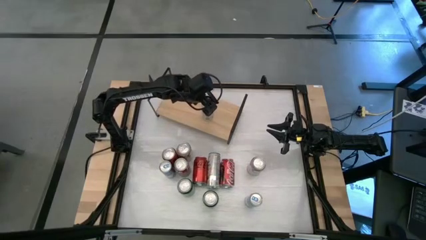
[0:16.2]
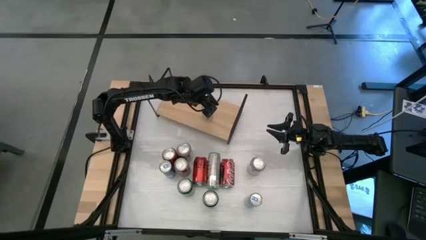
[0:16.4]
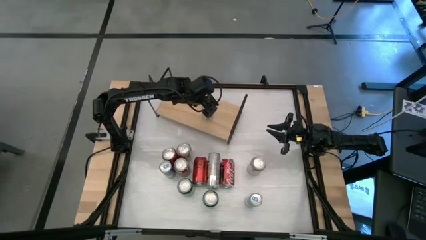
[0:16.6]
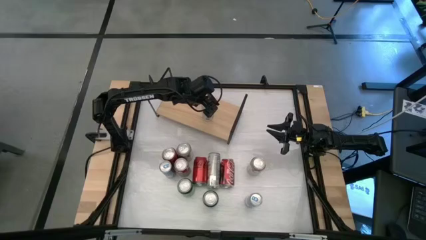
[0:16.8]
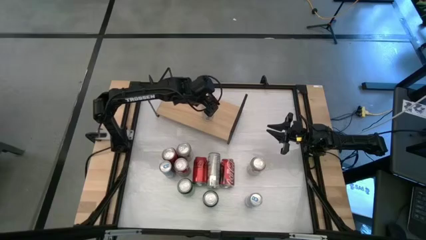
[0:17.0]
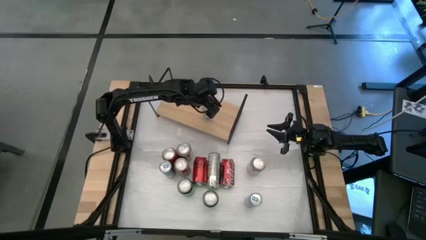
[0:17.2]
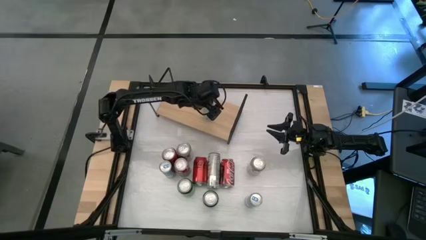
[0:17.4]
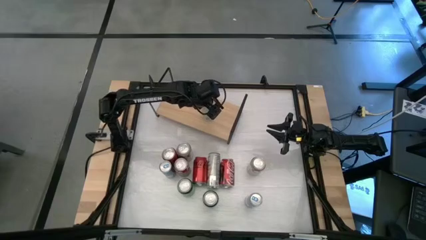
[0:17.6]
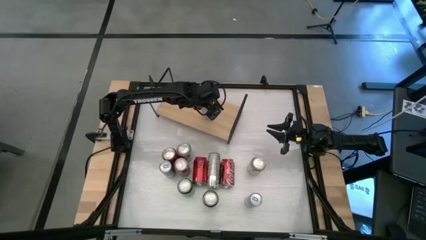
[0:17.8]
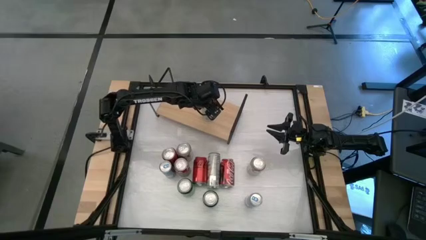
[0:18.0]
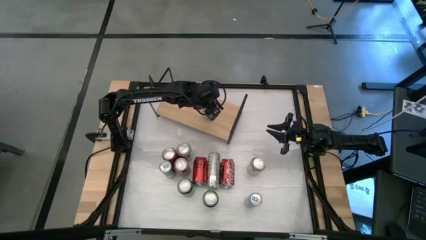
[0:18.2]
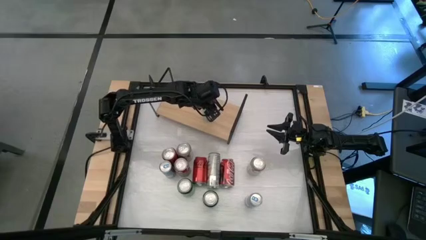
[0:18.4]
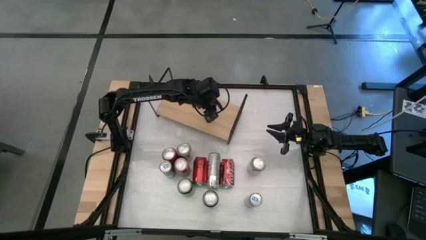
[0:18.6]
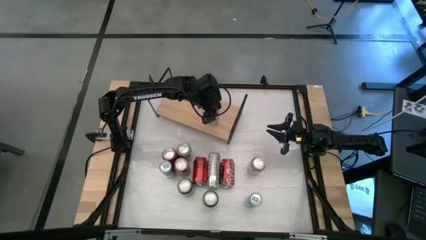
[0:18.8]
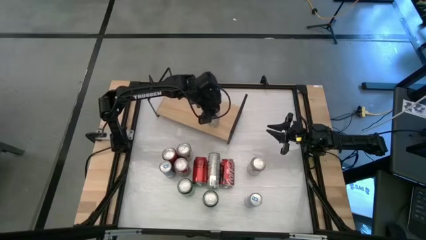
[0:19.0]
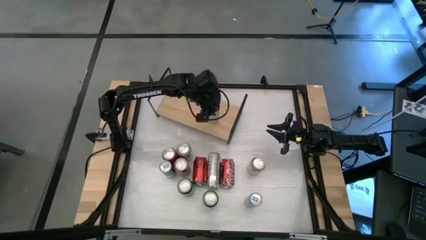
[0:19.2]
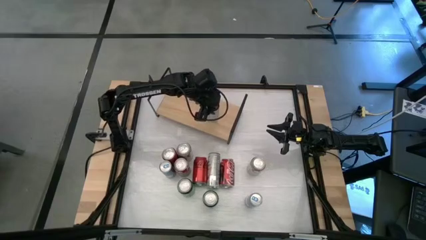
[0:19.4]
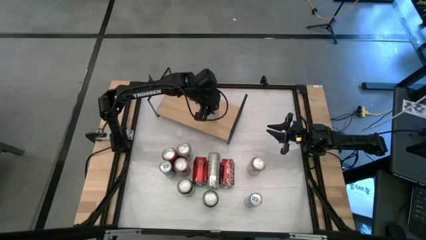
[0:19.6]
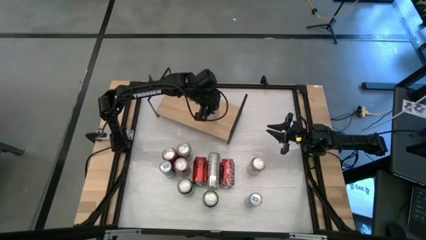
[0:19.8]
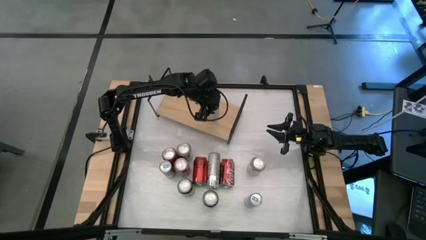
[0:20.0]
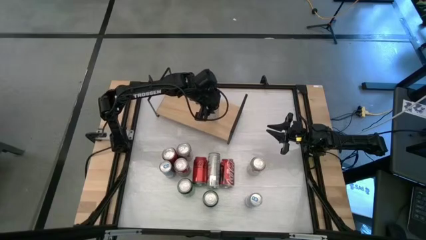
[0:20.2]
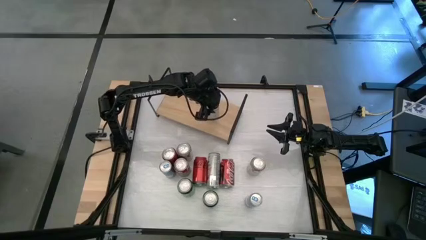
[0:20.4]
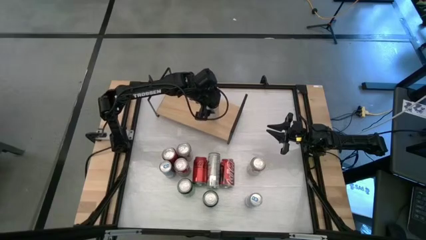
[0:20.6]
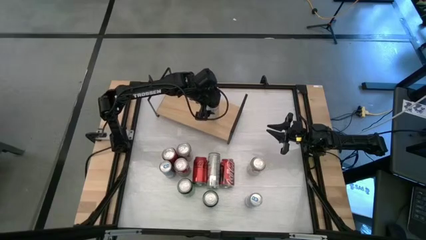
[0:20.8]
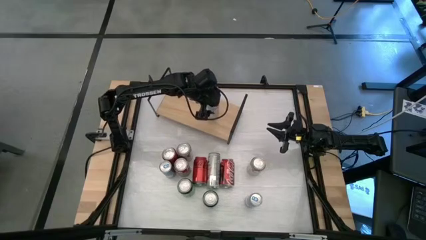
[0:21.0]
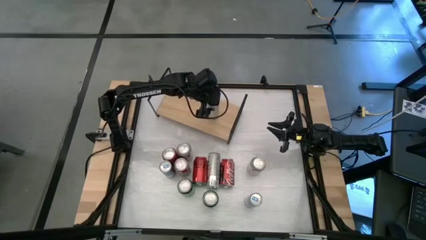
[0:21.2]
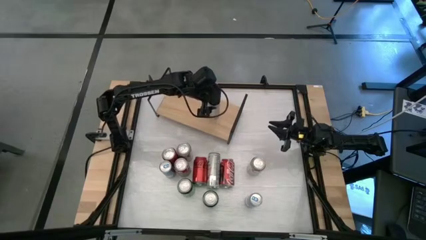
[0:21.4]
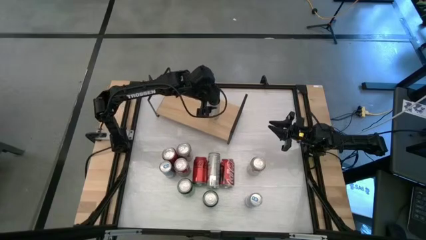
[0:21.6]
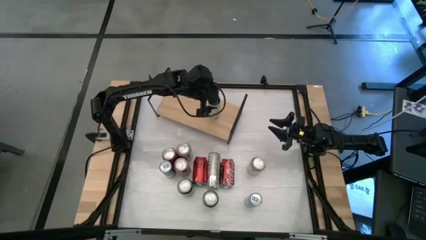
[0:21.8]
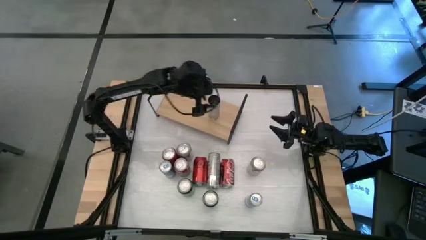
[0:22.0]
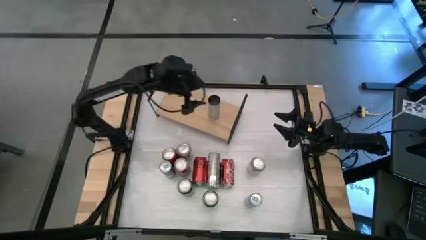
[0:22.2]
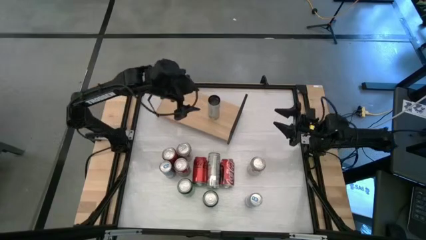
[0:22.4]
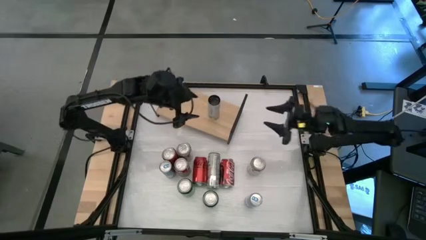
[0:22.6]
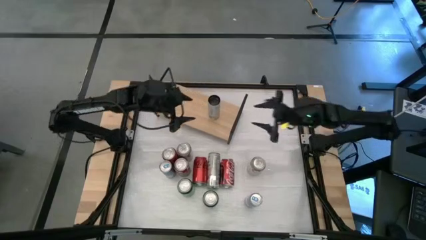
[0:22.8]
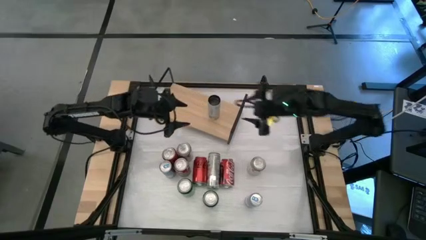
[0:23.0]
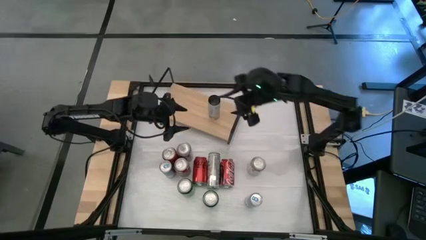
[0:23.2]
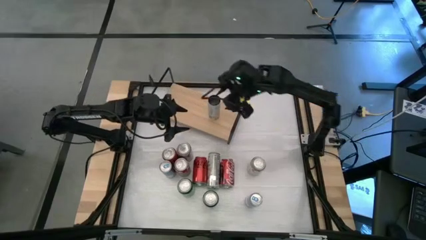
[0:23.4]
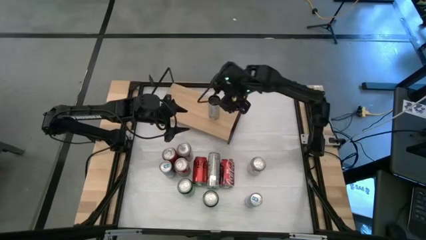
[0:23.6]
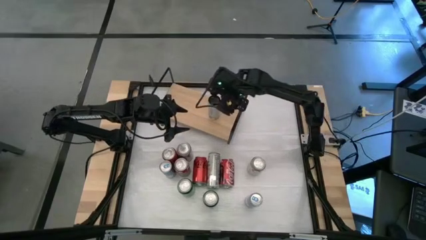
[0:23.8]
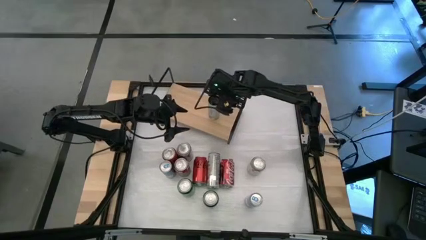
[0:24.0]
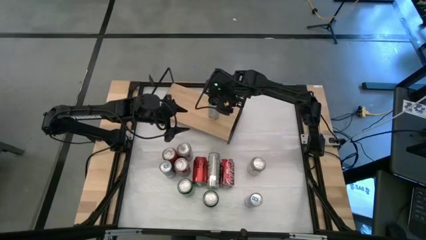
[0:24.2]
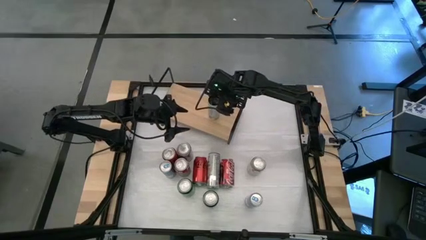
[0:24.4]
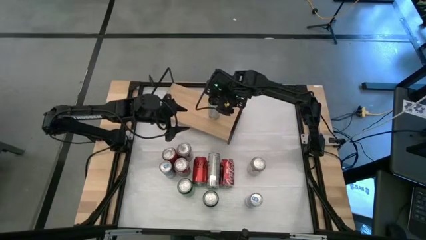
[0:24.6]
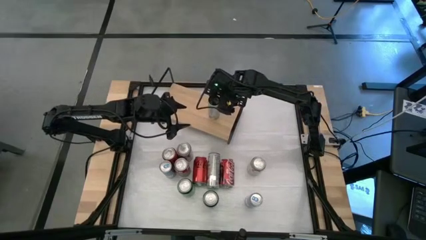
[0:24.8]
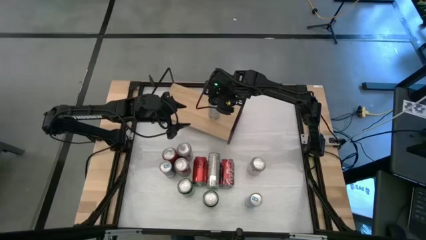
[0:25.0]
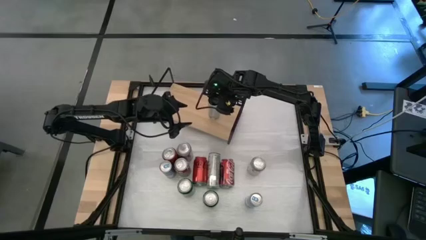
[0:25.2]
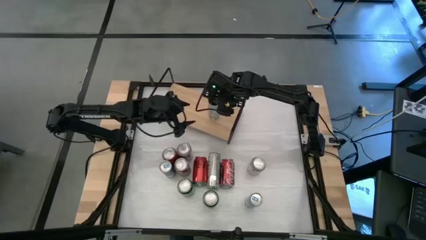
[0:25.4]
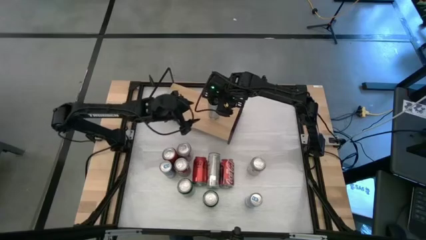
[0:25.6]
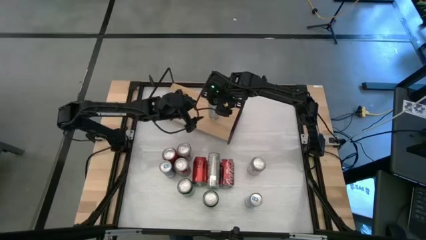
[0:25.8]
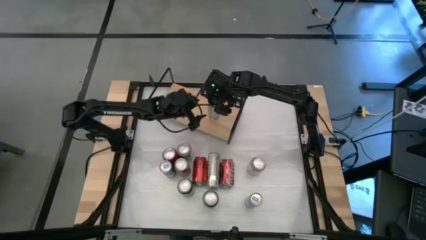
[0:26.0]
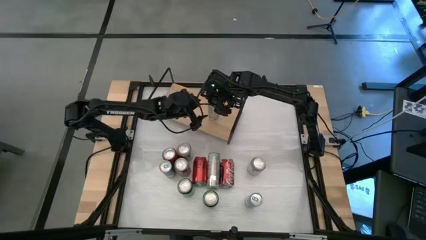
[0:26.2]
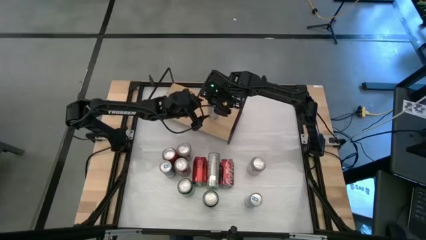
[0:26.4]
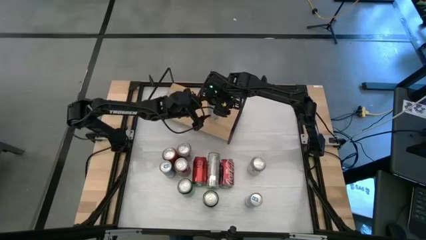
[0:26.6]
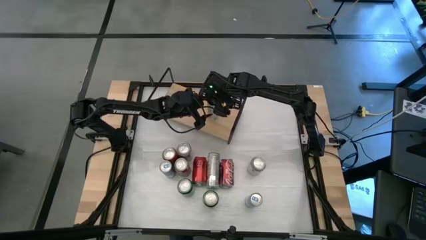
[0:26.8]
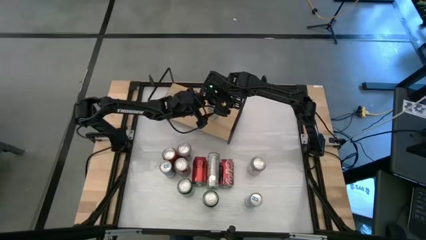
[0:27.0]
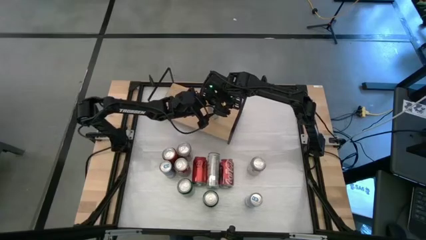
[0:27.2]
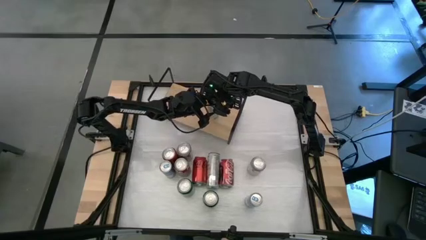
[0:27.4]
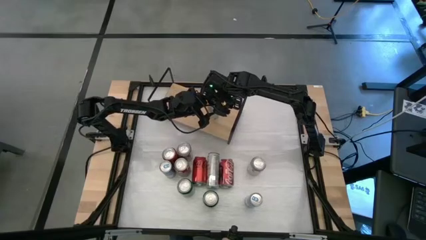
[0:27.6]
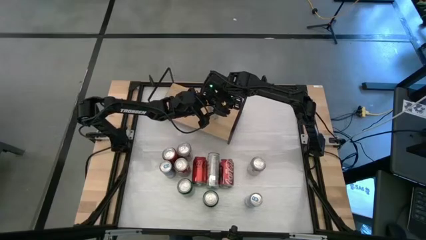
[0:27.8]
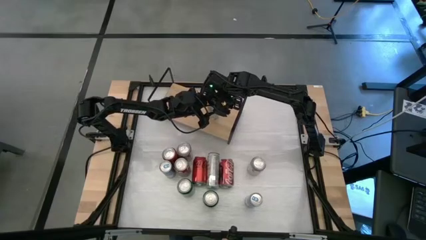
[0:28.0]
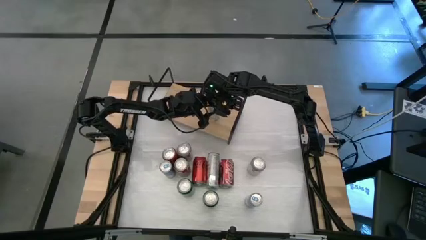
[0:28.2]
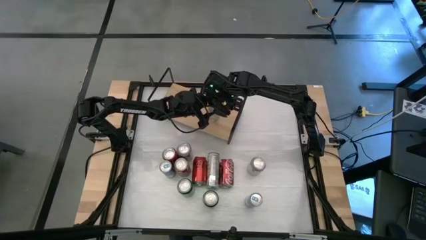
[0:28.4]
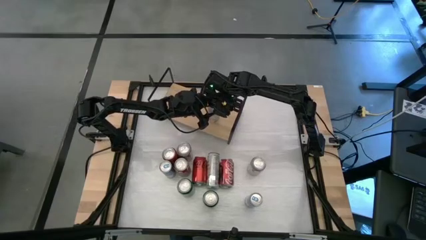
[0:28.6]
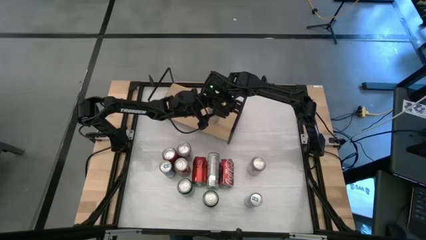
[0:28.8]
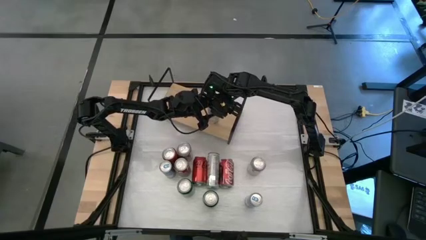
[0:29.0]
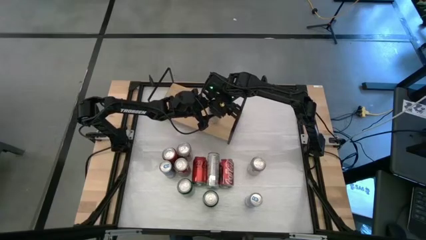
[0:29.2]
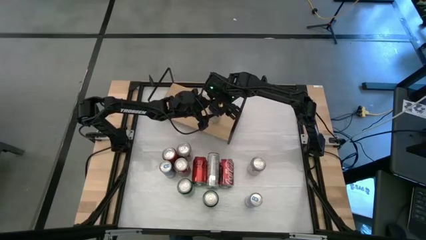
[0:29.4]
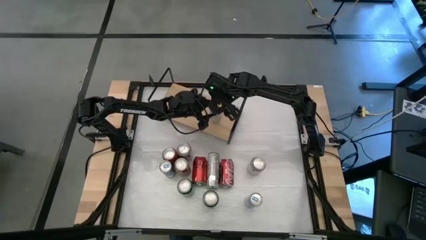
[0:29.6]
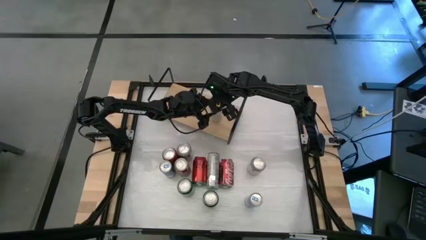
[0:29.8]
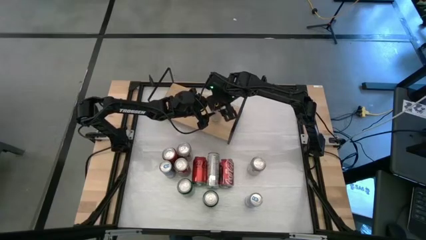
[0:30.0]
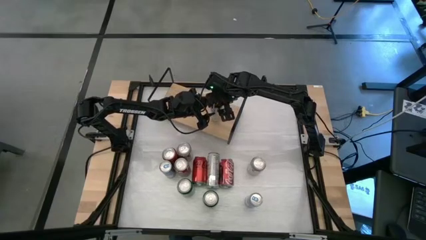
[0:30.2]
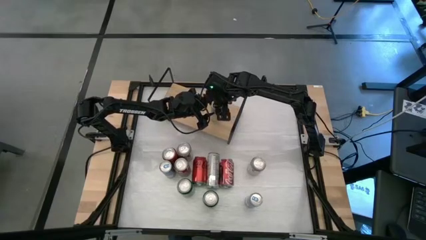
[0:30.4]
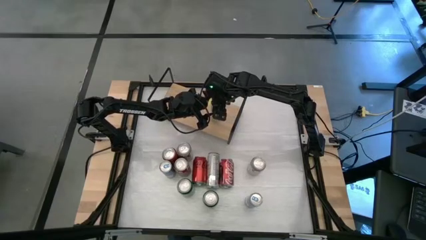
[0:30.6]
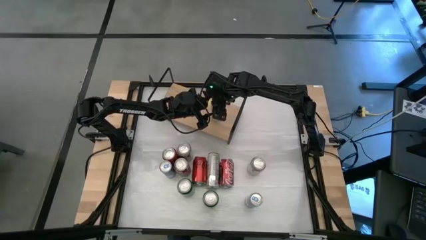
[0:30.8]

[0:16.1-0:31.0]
Task: Place canned beverage on shelf
Put the left white yellow soda can on the shelf

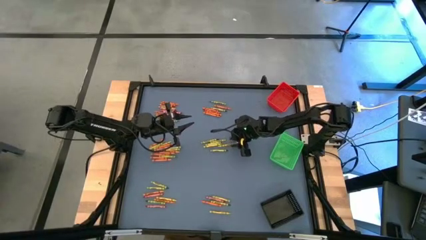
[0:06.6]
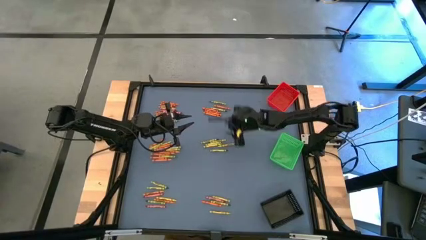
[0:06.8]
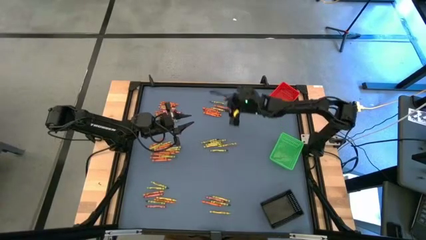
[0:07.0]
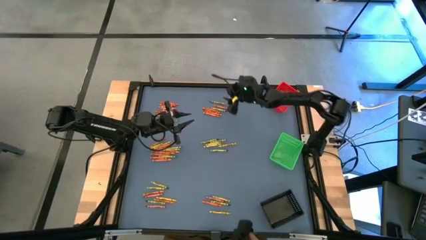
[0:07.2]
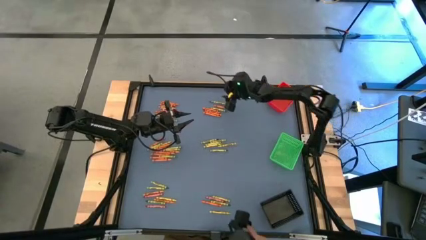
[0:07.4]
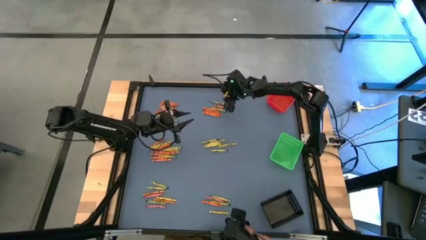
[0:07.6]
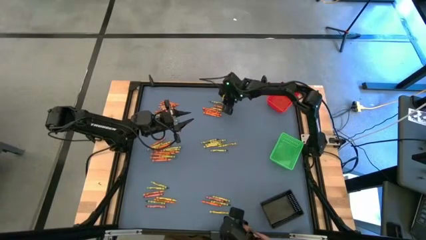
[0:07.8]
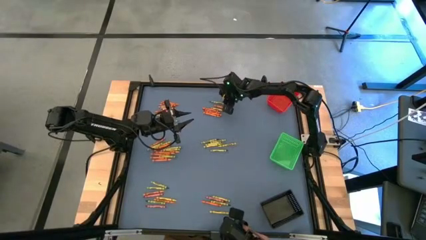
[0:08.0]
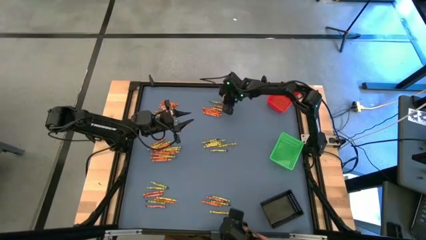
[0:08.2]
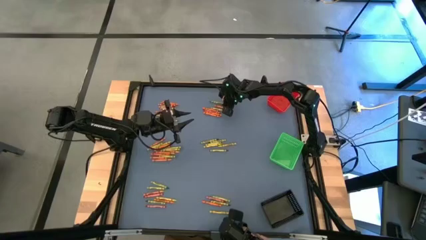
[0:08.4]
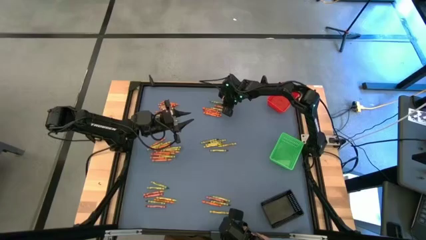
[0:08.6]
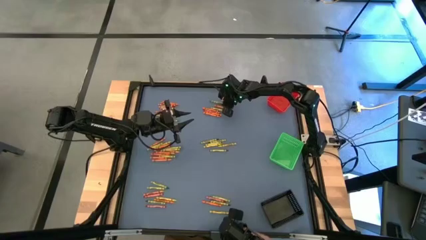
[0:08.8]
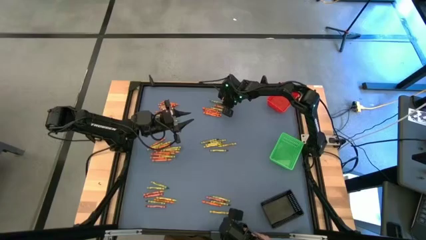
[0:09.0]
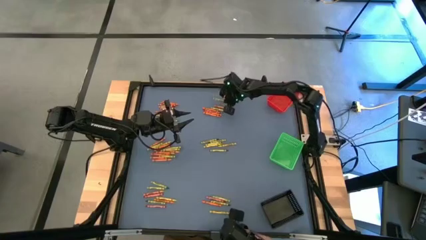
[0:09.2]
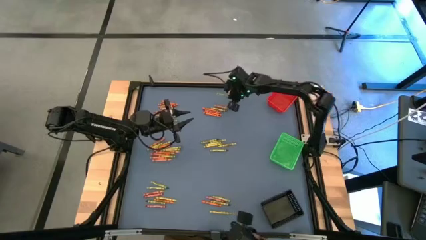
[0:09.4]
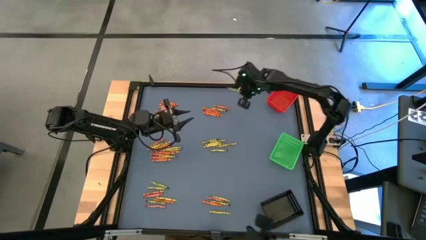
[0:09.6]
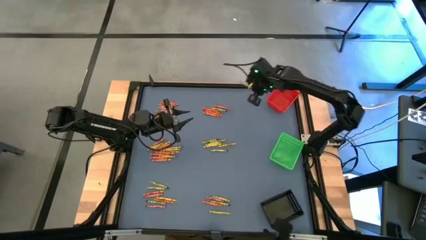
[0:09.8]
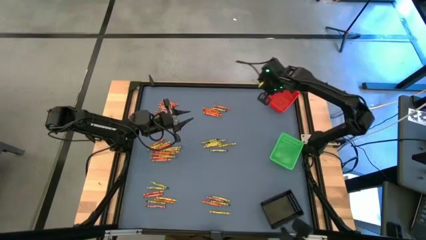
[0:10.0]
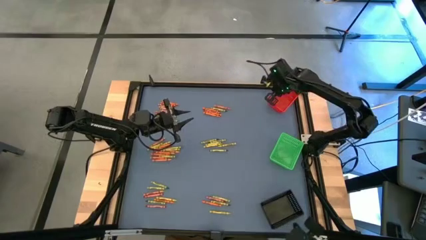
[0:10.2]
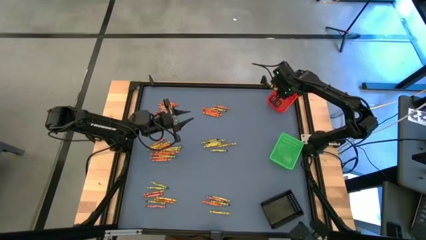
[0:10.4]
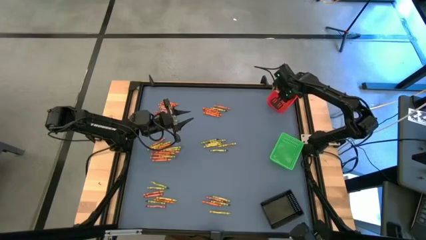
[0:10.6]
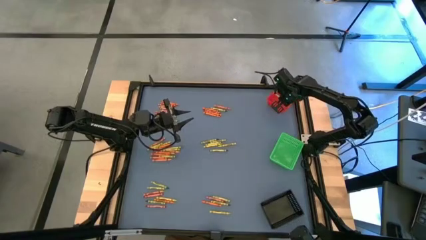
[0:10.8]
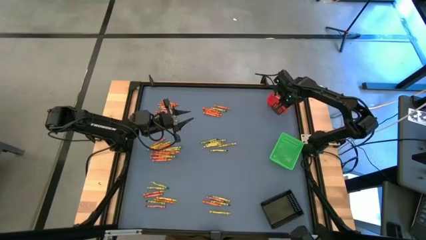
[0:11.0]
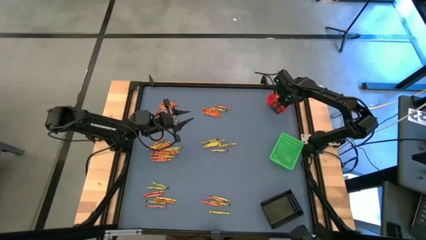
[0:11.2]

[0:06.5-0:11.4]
Task: Sort crayons
Put the green crayon into the red bin
